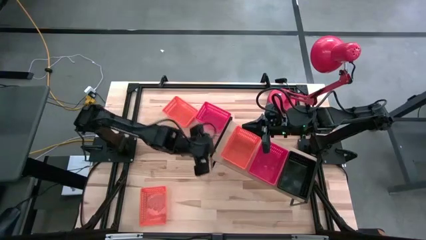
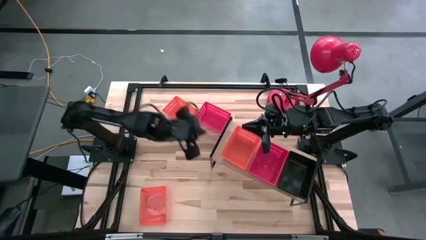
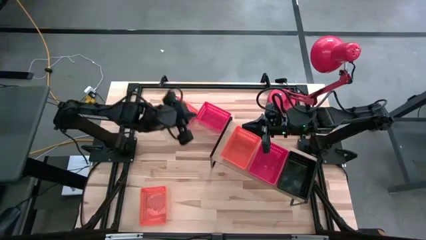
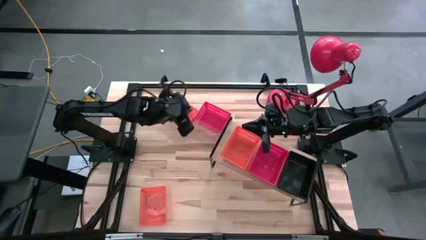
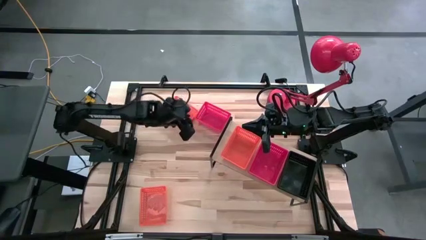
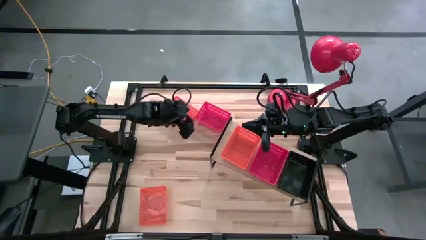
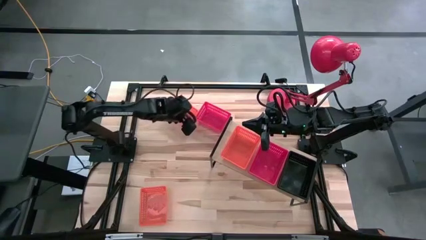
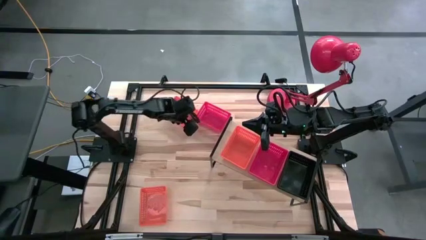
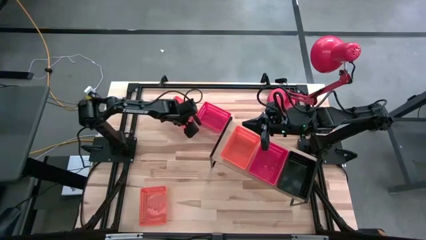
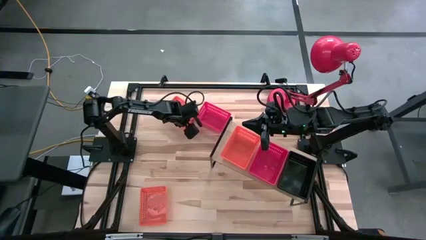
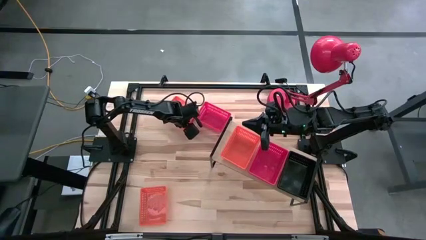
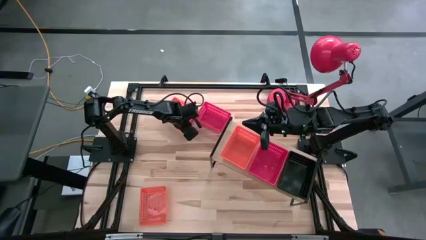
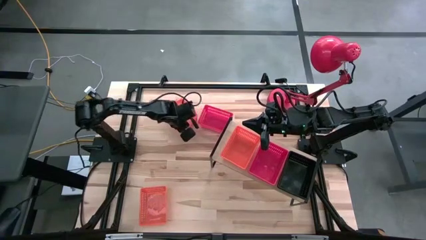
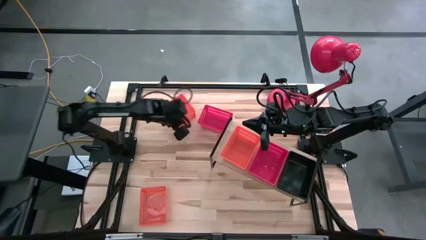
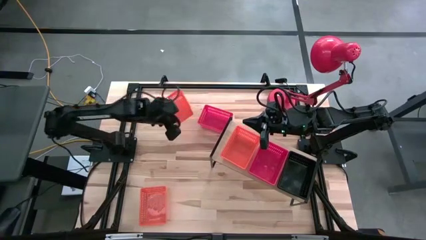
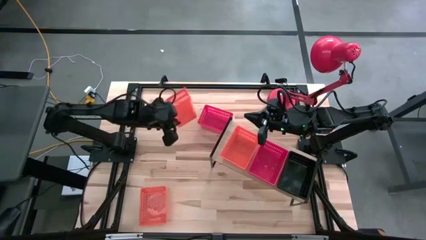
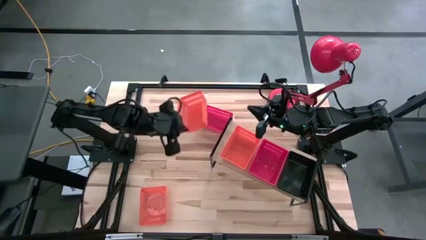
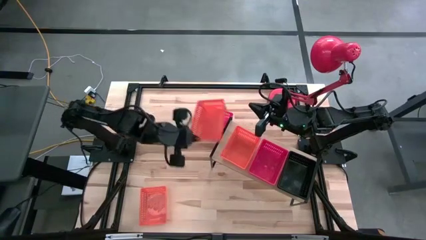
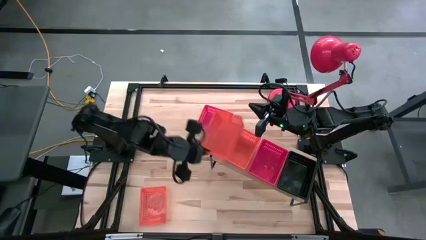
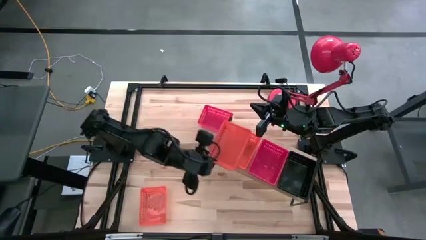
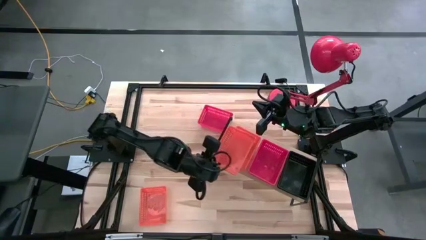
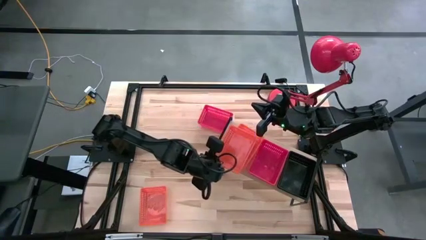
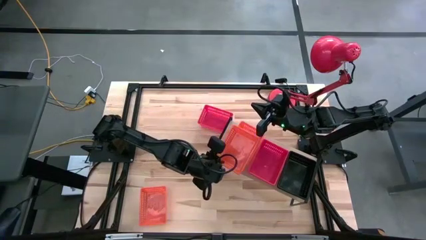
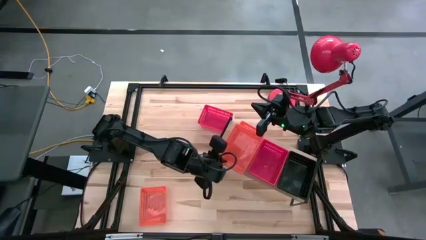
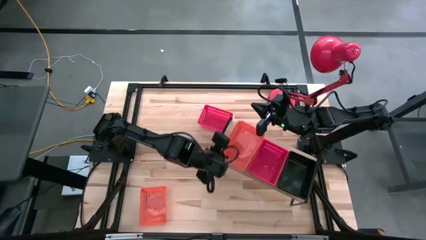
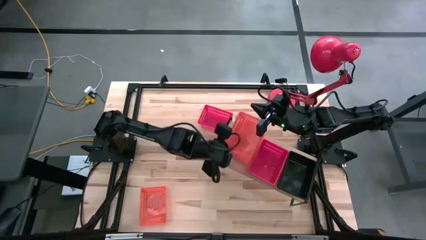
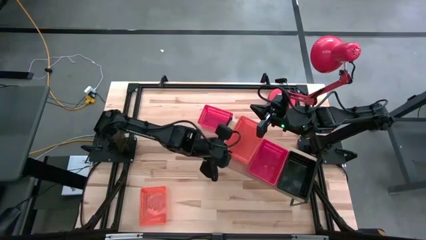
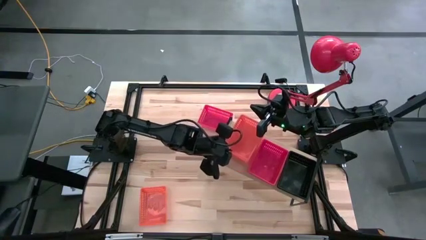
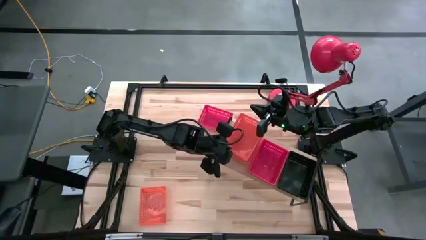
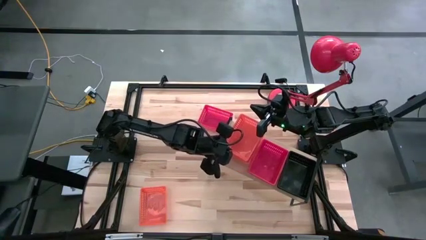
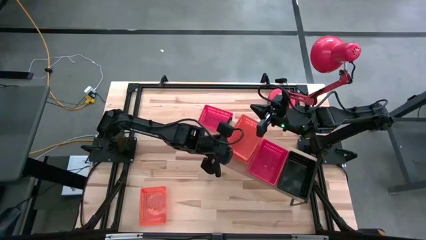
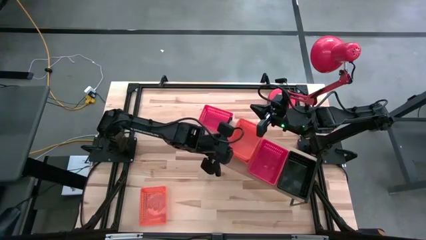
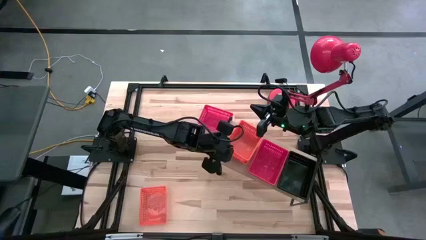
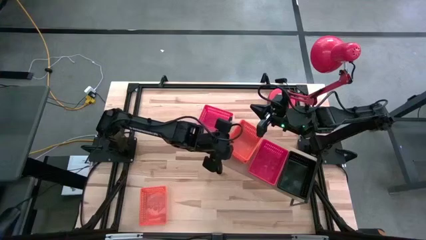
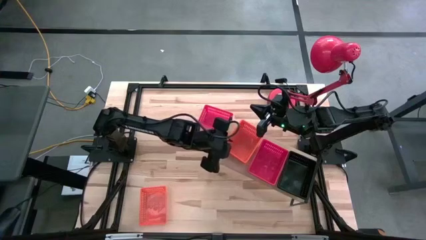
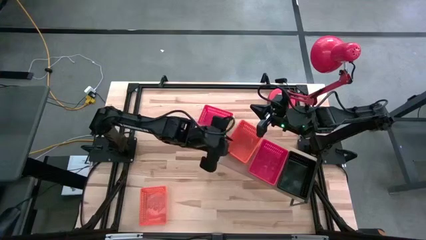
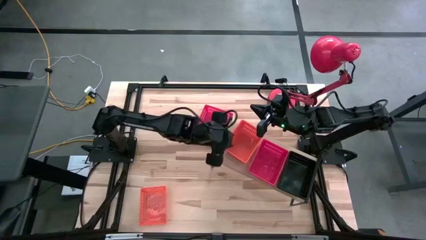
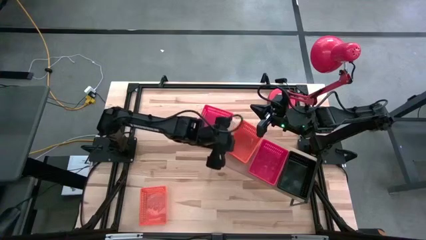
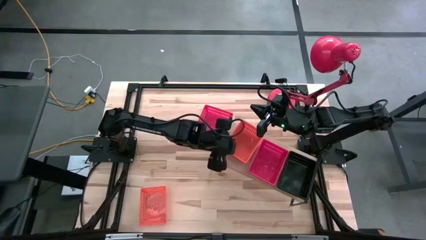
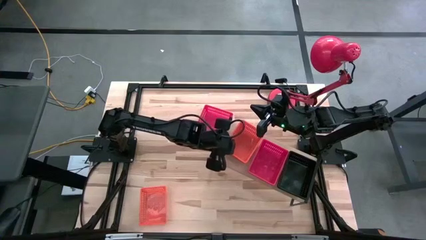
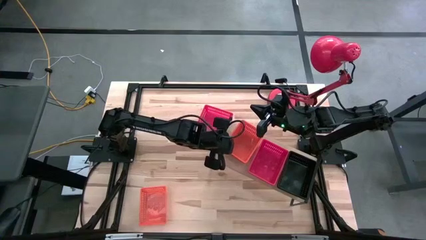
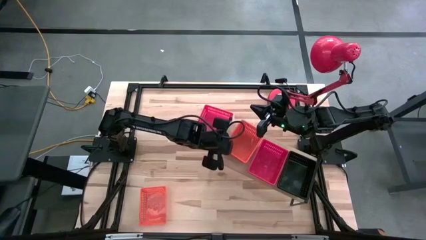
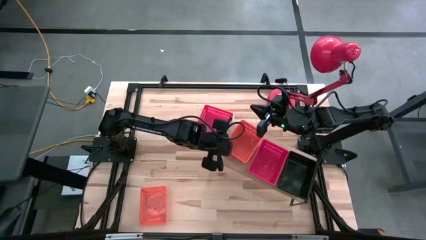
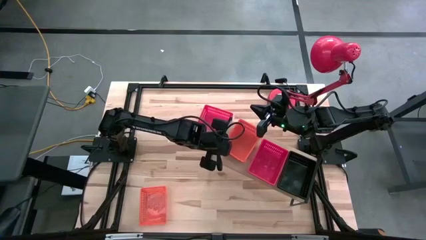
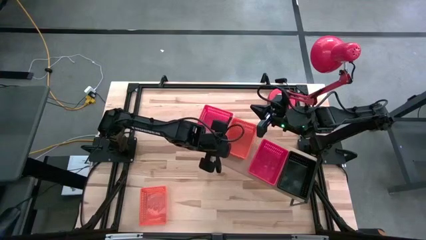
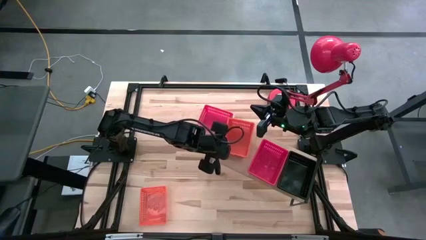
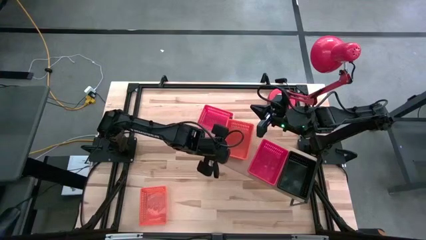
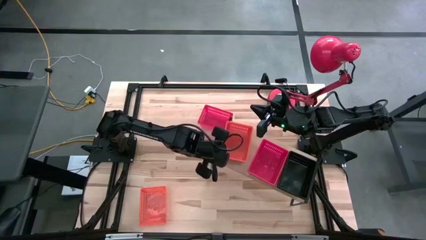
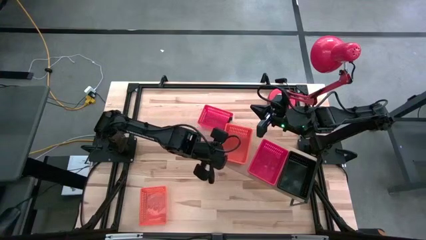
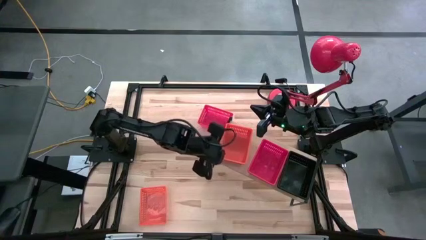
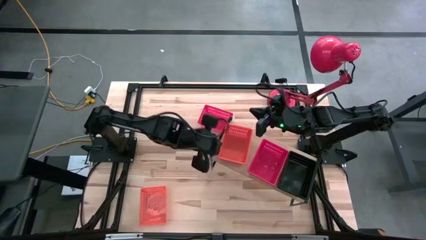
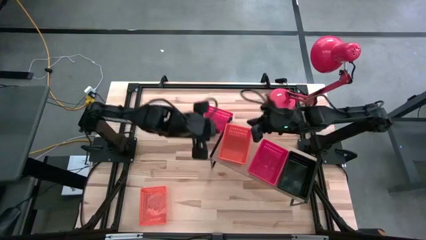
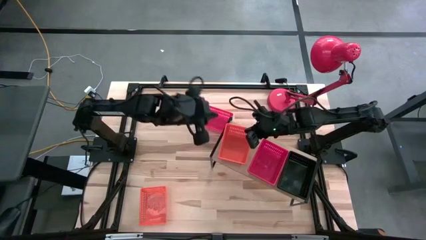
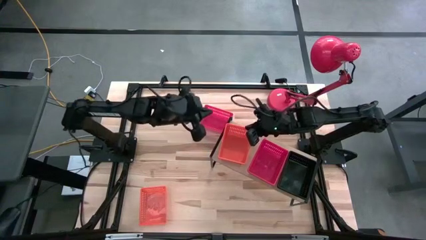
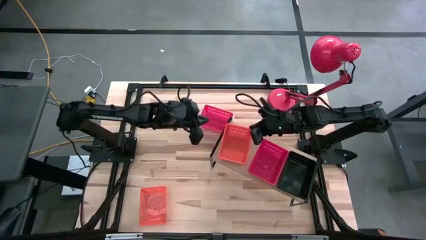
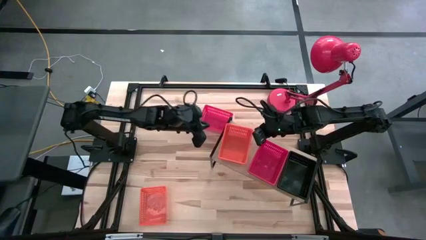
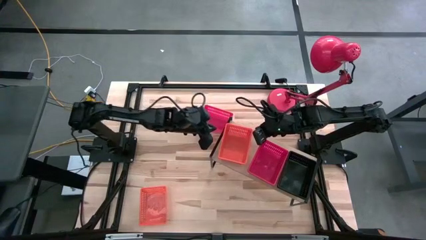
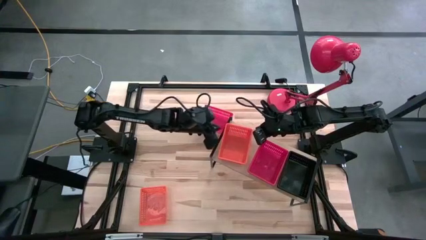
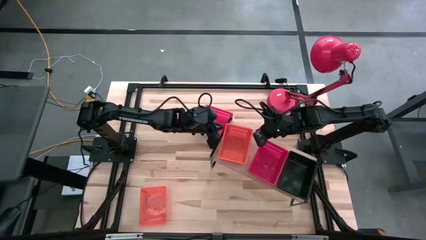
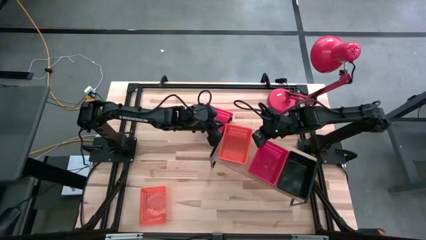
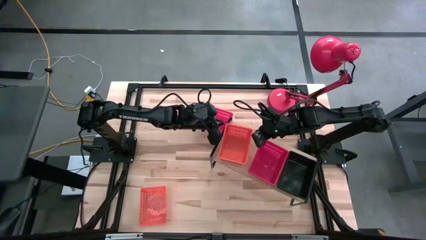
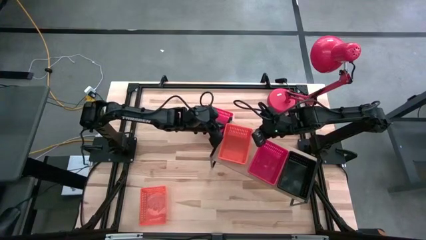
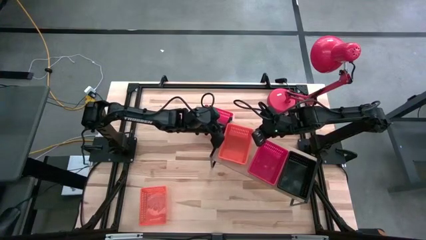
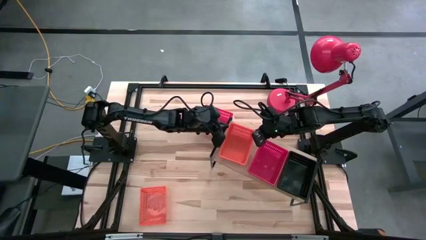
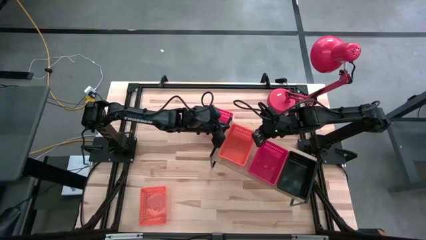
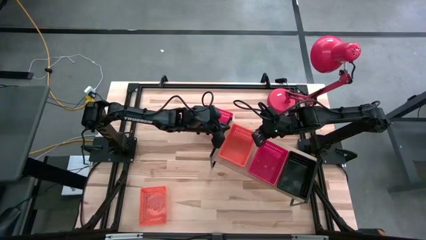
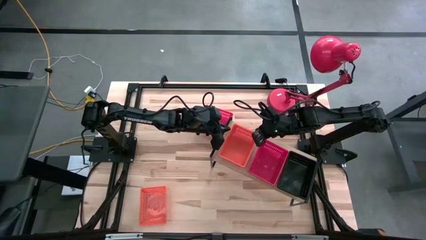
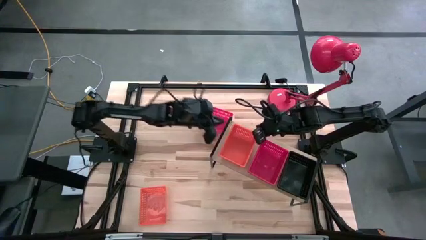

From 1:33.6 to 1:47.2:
Task: Stack baskets on shelf by color
Stack the top orange bin on the orange bin on the shelf

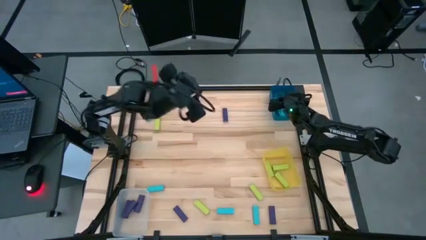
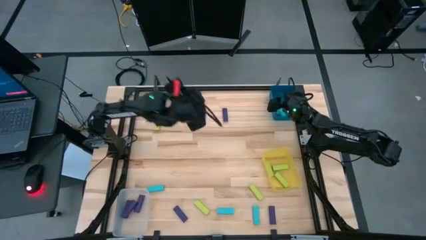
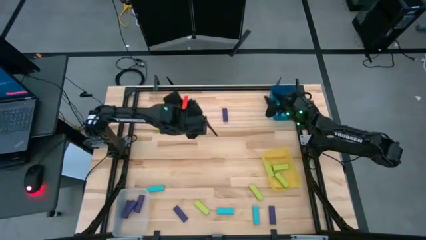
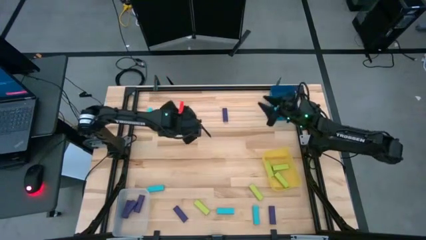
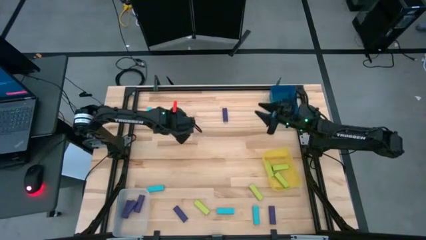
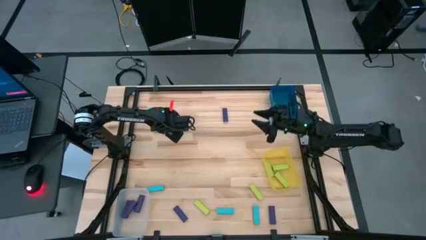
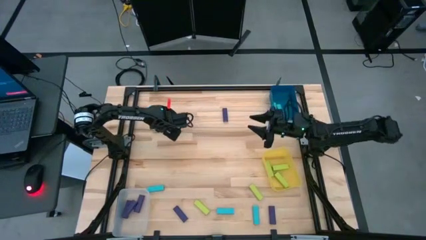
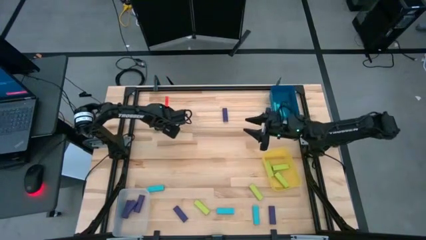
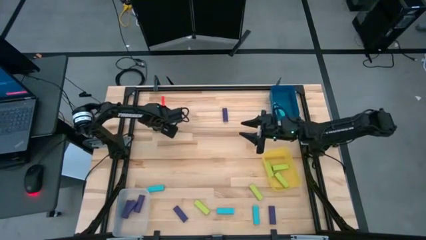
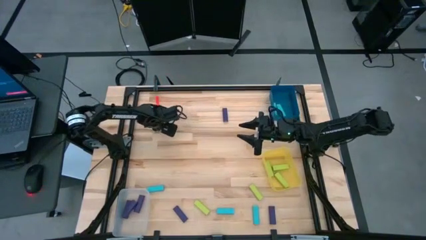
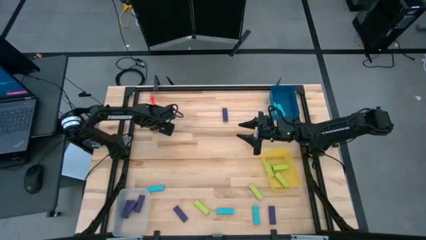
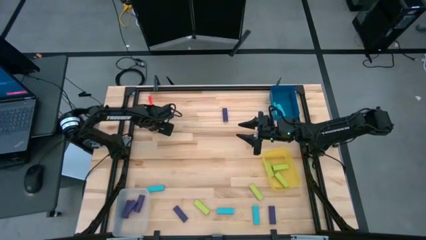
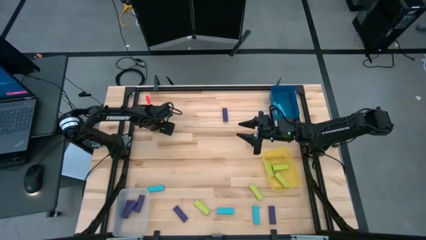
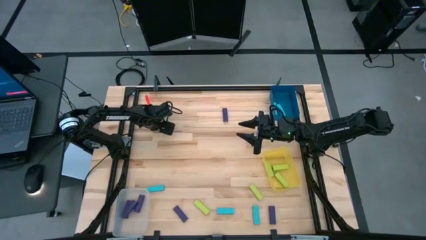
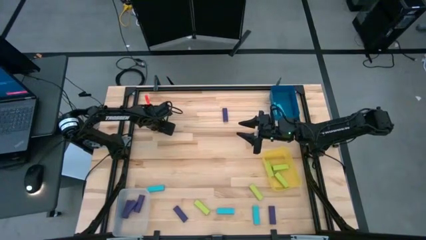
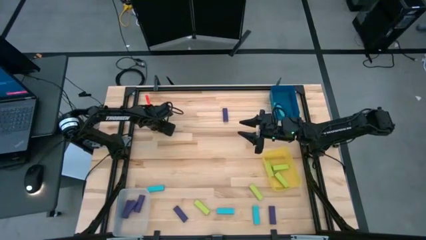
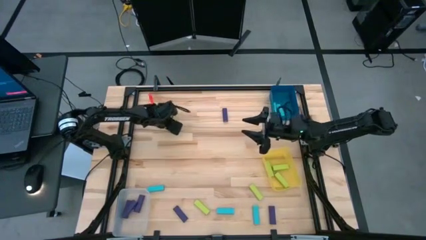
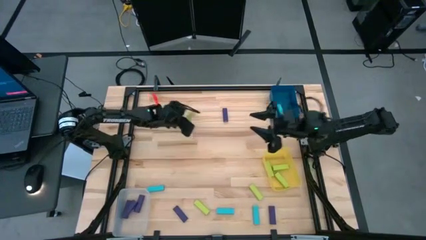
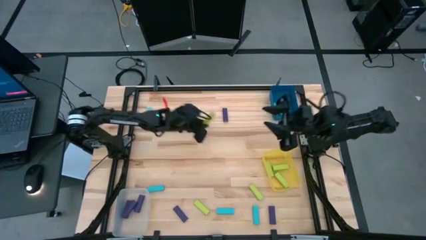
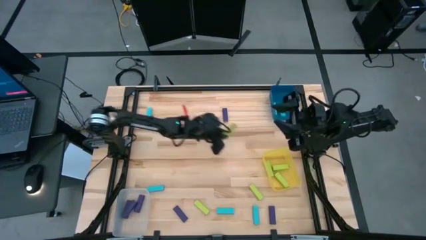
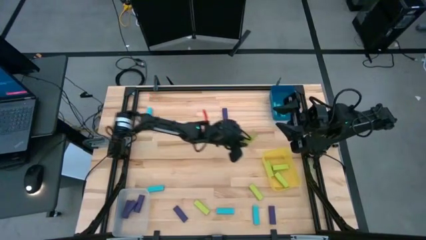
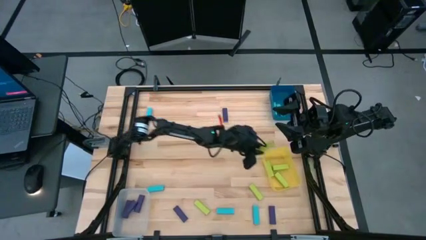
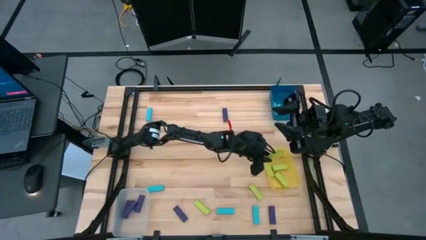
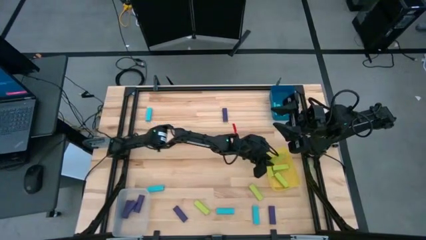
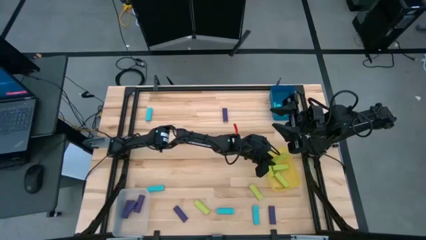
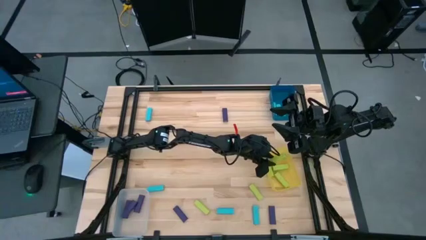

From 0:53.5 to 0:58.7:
Task: Sort blocks
Put the green block into the yellow bin
